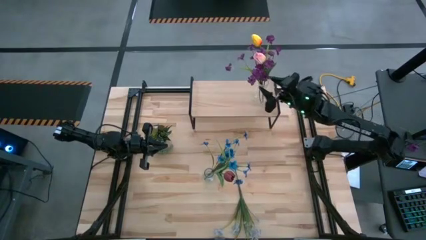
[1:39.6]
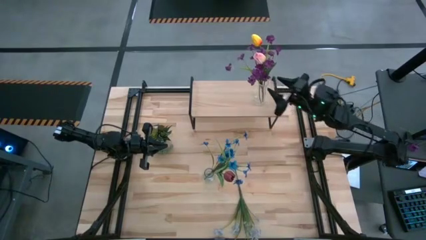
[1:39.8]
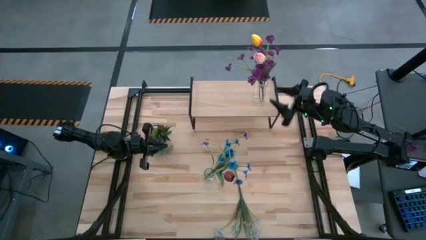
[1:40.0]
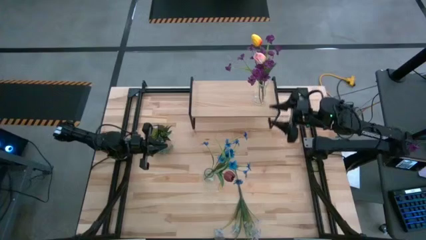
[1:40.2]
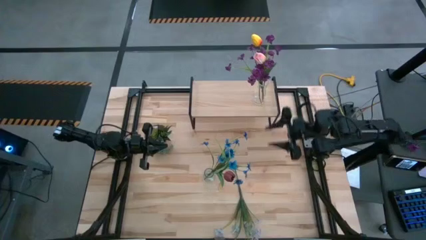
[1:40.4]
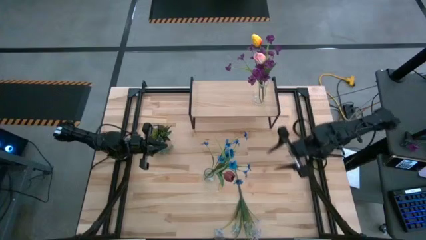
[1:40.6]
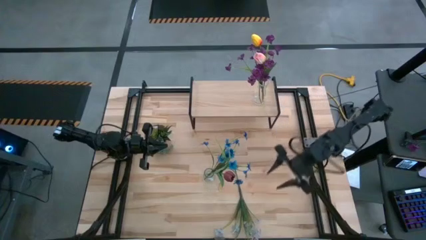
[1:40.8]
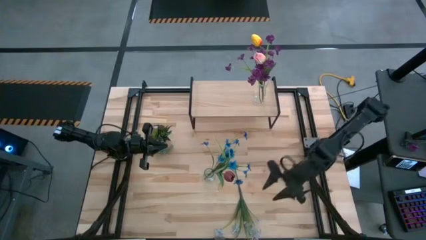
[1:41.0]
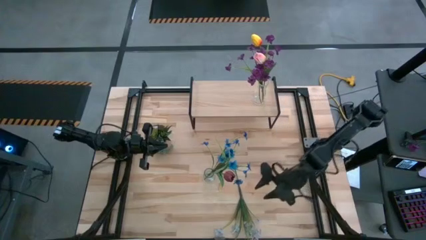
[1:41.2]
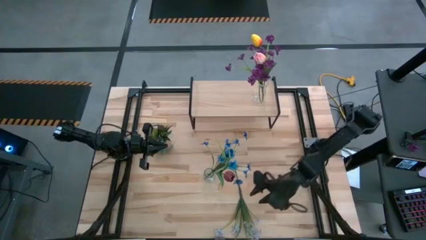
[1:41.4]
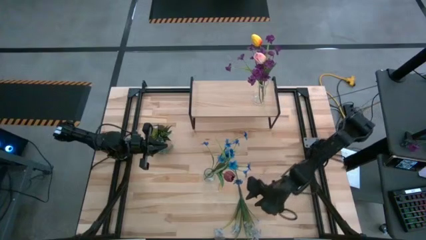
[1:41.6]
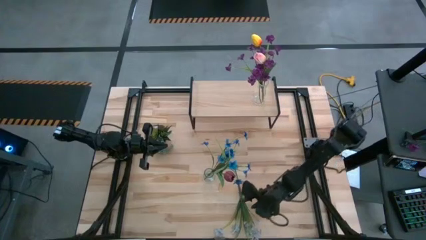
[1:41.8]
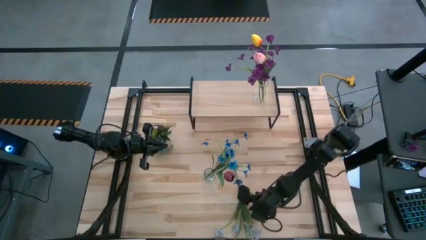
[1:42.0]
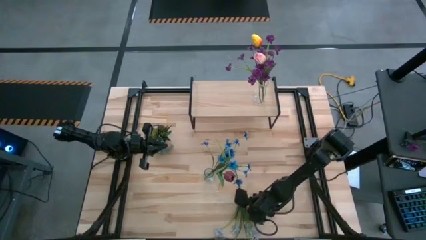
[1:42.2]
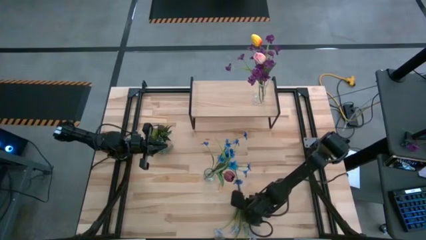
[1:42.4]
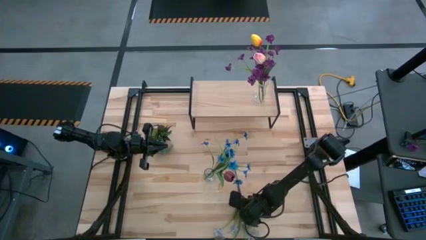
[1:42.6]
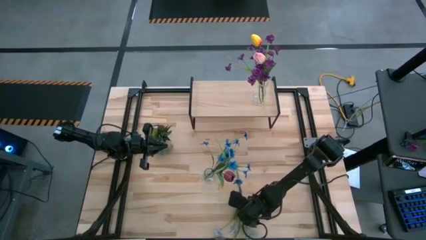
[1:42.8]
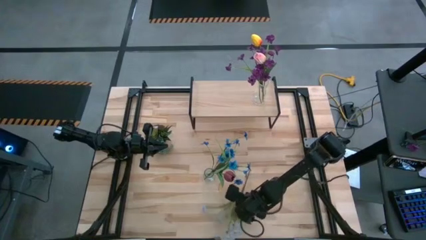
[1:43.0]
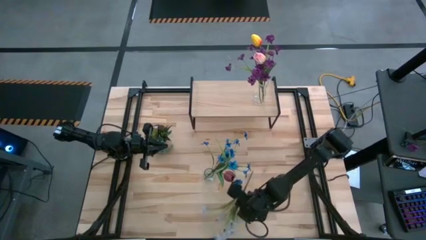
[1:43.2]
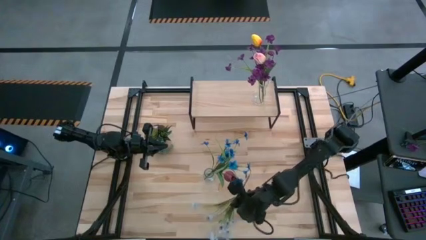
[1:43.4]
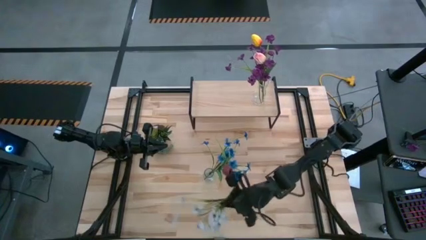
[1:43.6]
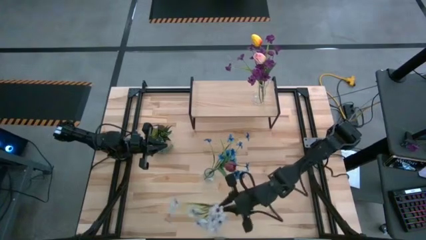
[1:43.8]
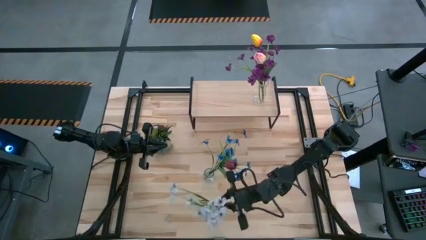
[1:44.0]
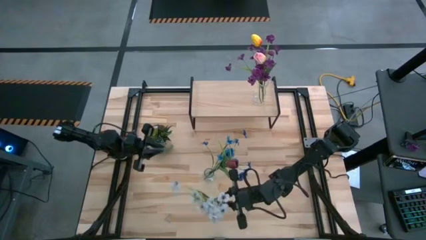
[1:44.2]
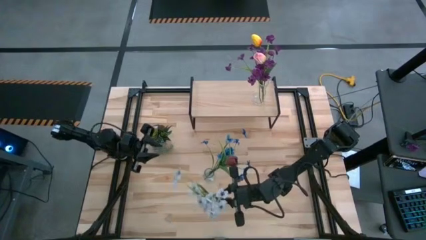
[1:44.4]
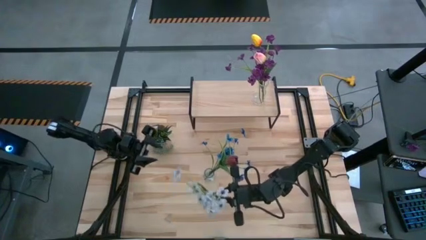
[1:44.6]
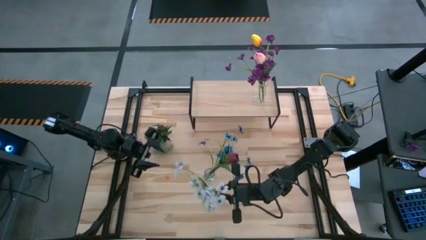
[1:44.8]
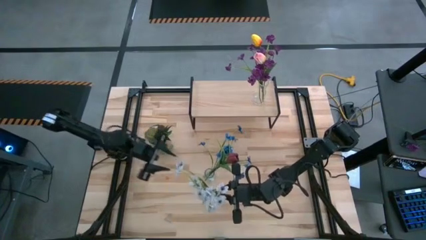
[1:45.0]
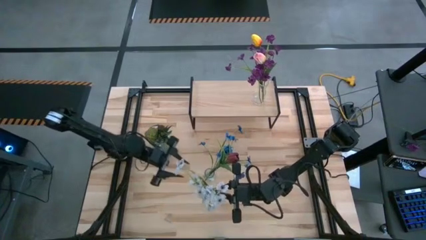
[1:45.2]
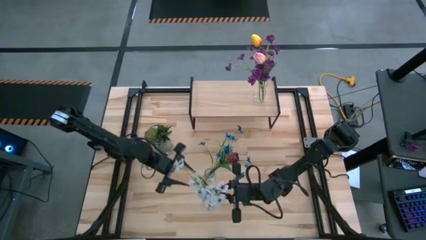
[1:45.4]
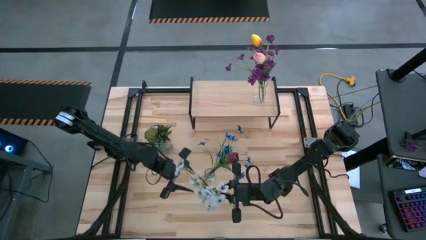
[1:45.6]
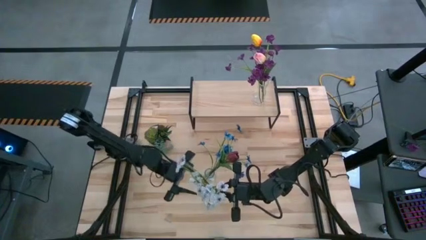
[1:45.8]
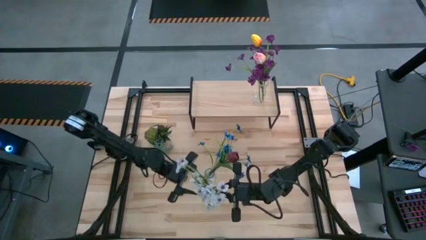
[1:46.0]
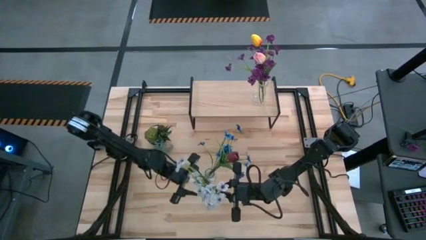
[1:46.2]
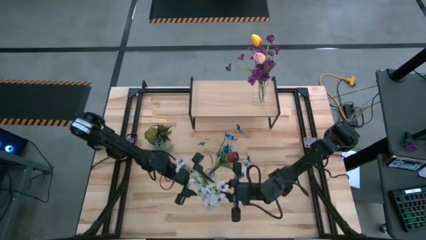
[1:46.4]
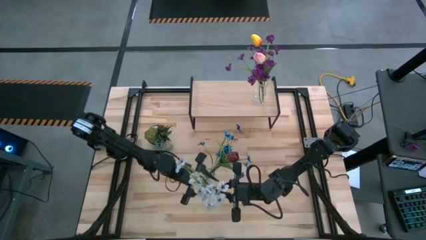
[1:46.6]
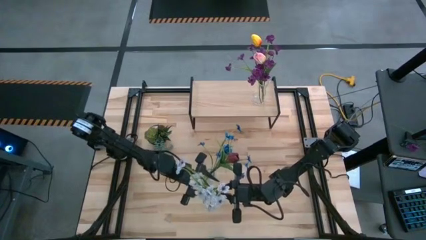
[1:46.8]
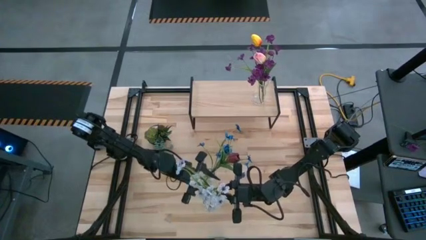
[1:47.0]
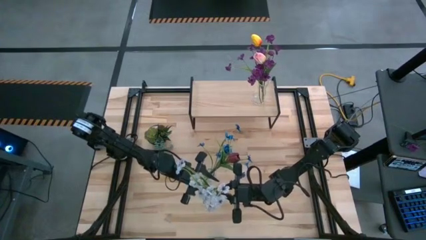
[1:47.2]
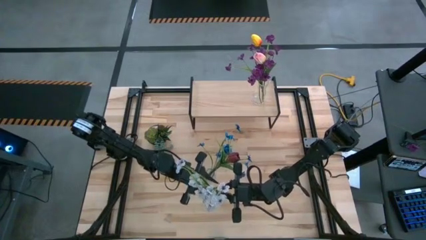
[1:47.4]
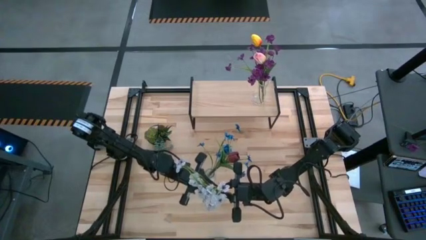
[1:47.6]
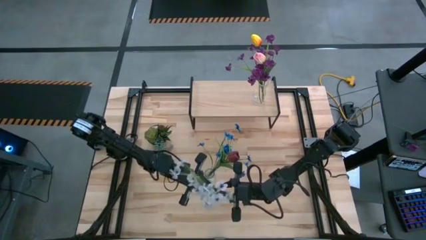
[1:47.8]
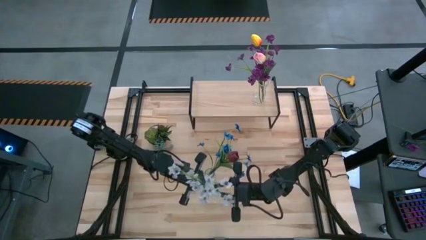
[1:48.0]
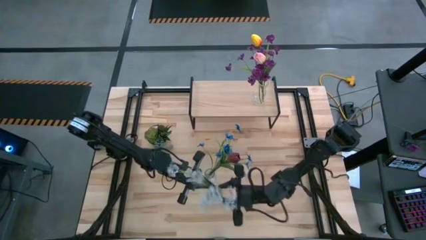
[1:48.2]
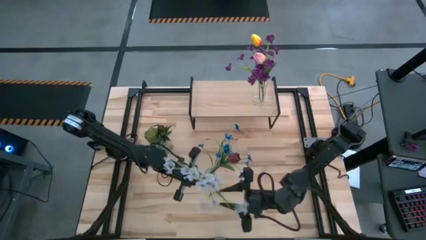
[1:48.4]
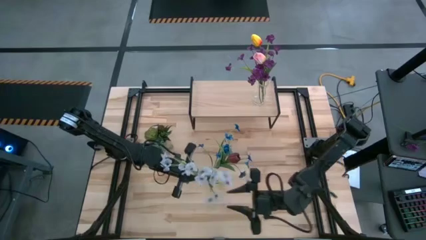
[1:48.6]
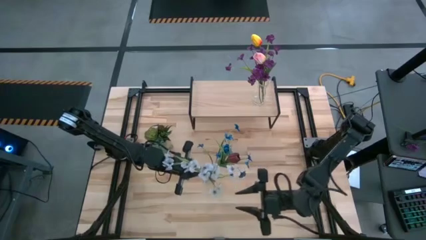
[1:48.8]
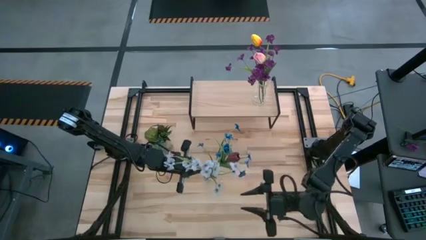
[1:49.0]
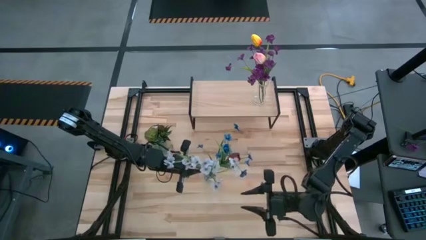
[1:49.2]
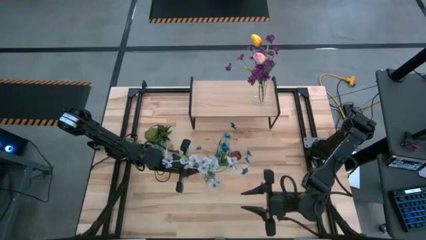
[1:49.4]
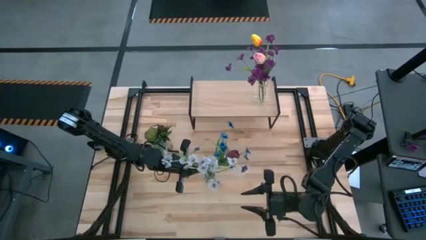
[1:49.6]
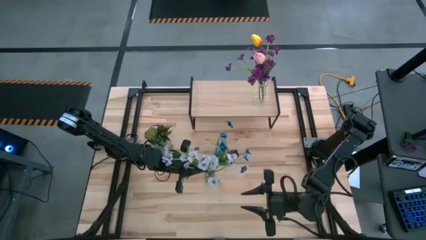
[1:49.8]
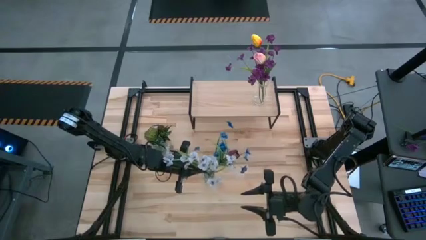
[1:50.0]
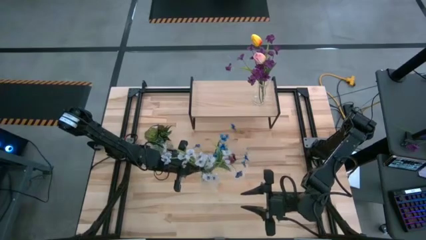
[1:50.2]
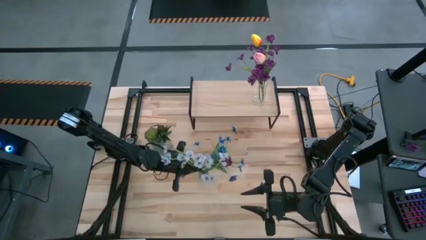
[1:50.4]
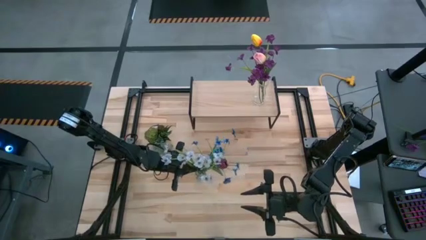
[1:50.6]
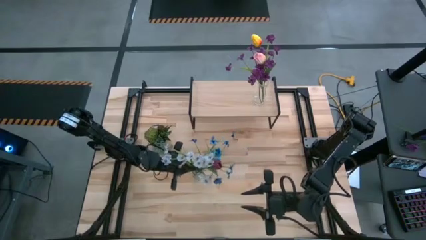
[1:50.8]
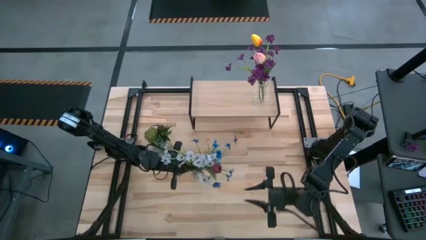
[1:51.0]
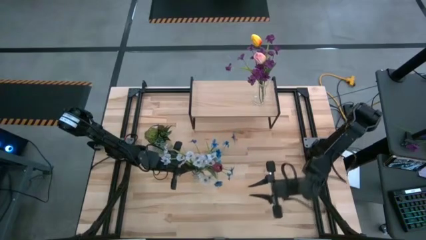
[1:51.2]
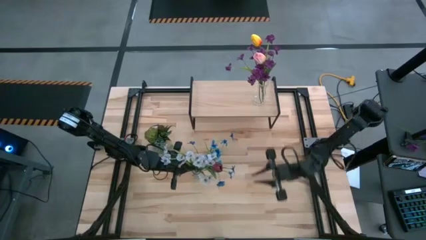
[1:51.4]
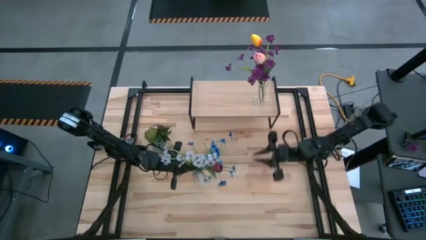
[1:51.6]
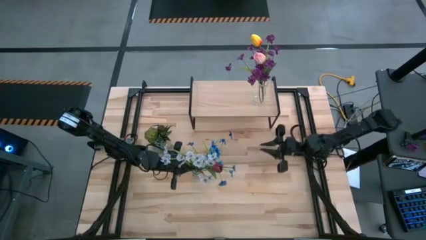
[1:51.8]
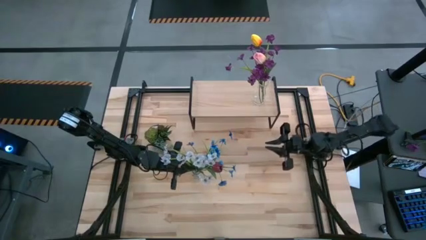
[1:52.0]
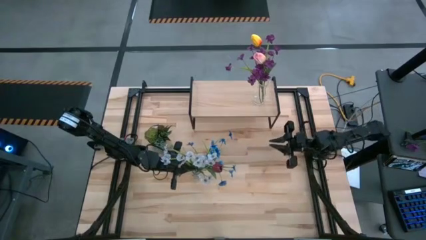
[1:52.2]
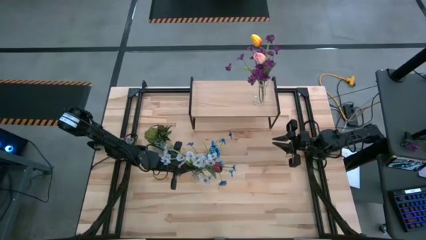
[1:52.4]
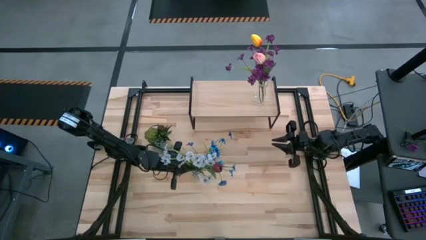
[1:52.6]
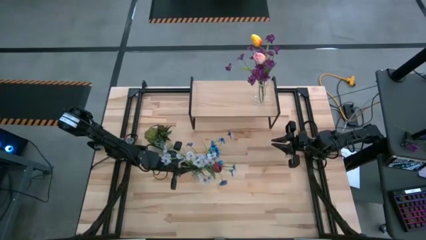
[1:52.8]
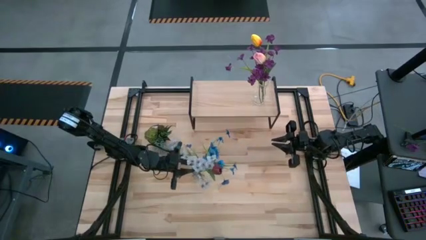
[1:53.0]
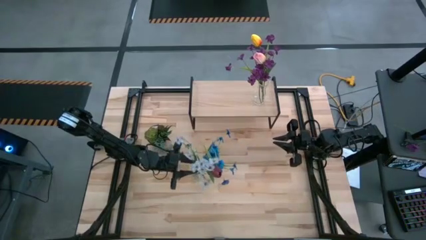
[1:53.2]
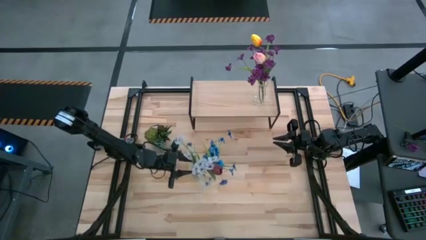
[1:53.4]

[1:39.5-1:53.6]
Task: Pick and place flowers into a vace then onto a shelf
Put the white flower into the transparent vase
